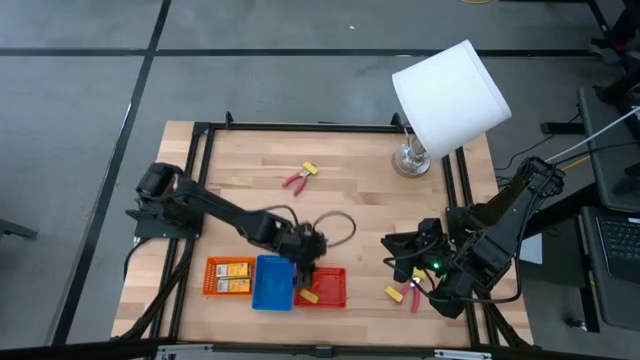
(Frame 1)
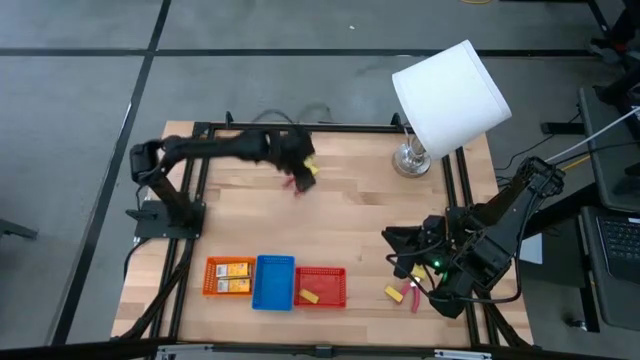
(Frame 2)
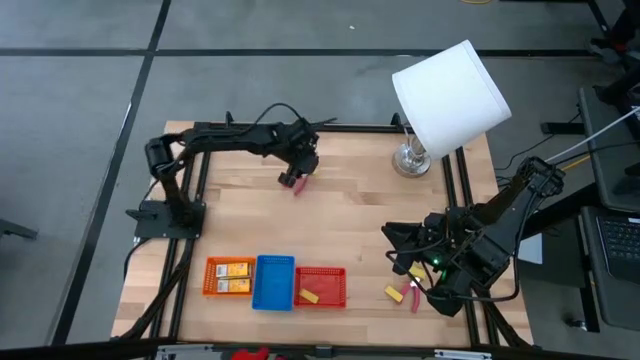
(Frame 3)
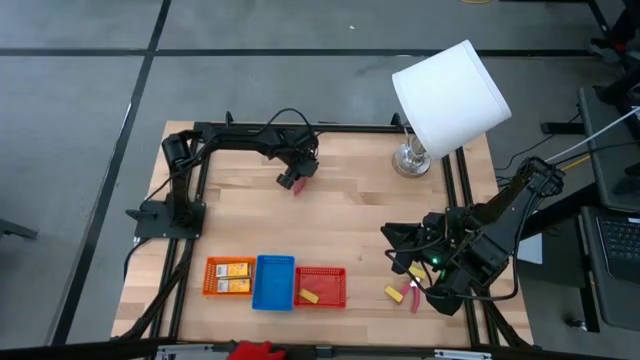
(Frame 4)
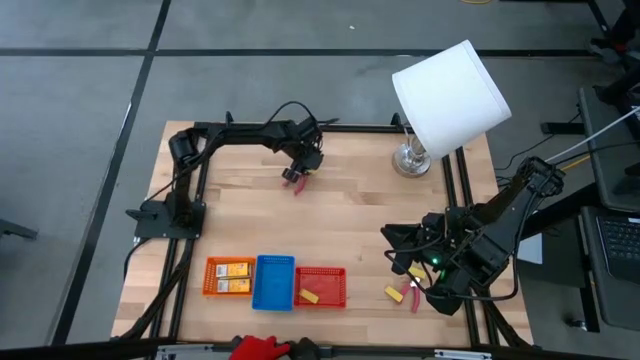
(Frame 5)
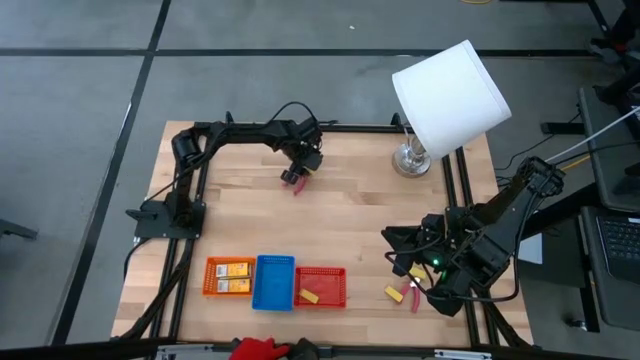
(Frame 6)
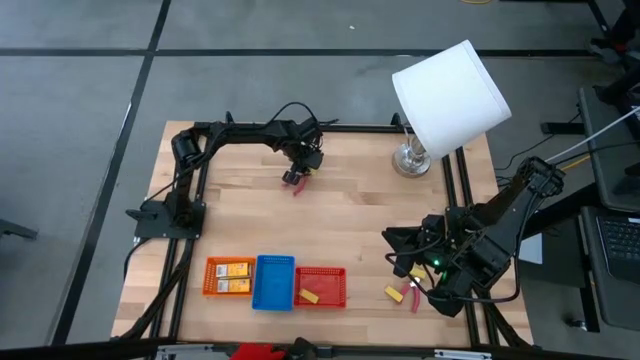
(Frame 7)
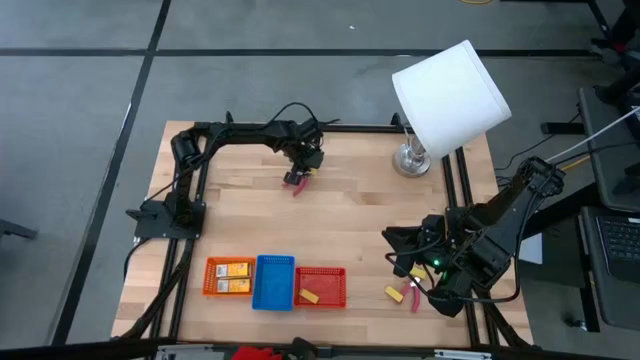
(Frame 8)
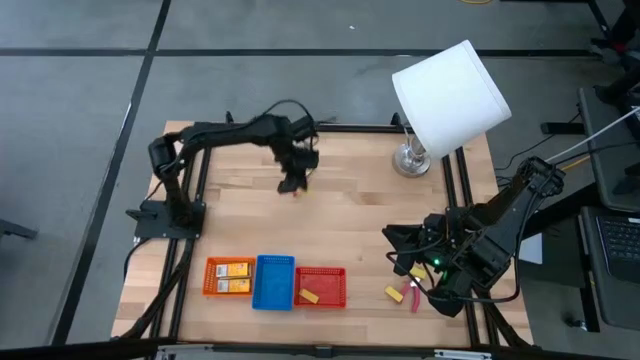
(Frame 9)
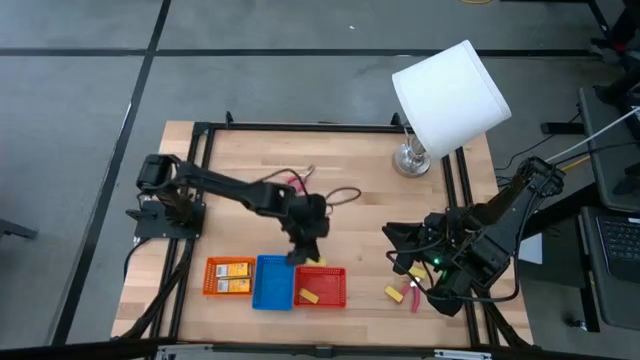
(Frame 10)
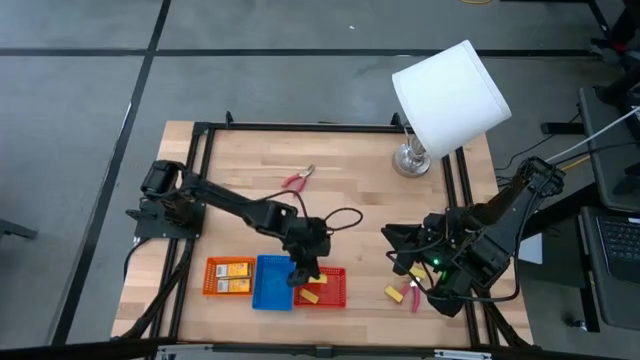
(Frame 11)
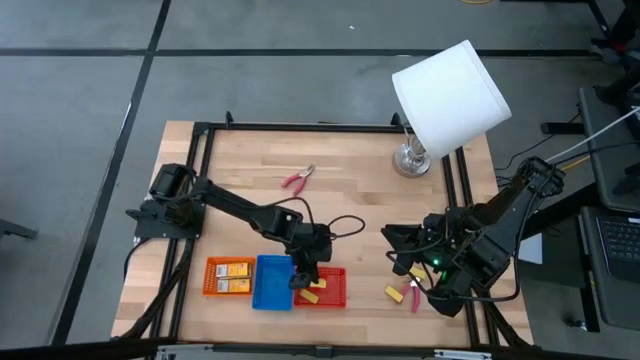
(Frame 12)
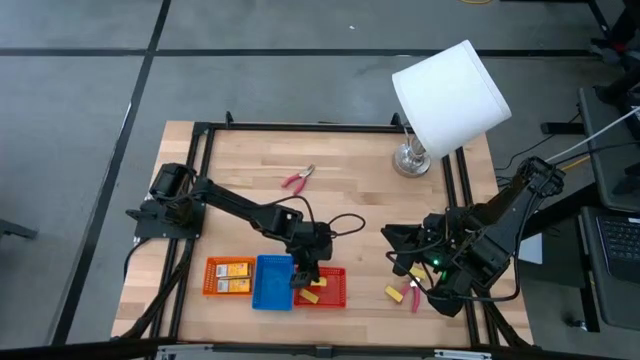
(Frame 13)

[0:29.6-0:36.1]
Task: Pick & Place School Supplies
Put the eraser into the red bin

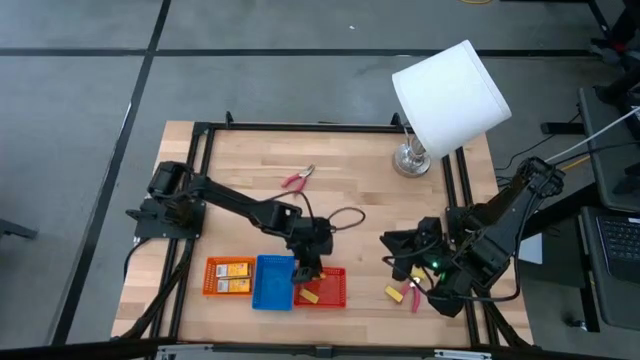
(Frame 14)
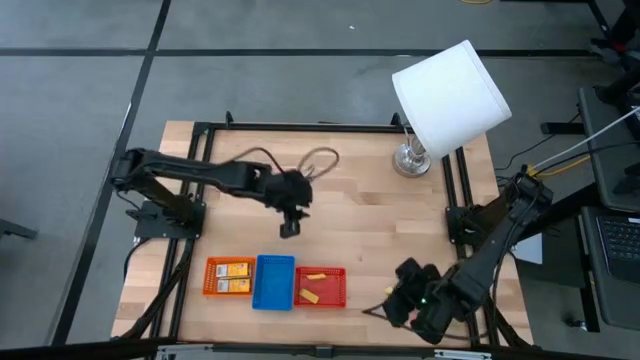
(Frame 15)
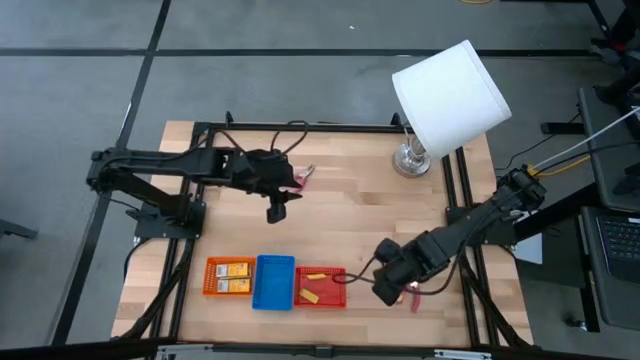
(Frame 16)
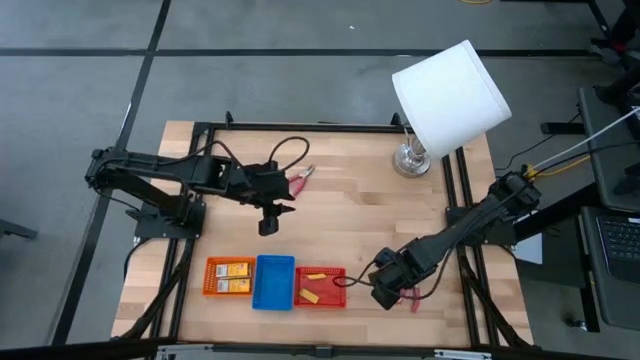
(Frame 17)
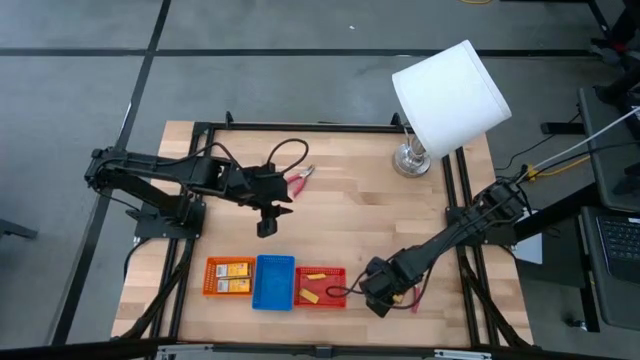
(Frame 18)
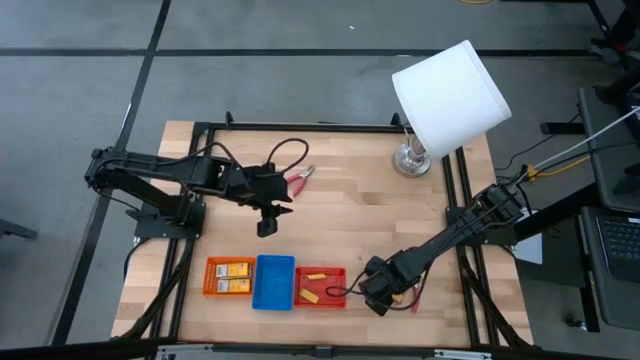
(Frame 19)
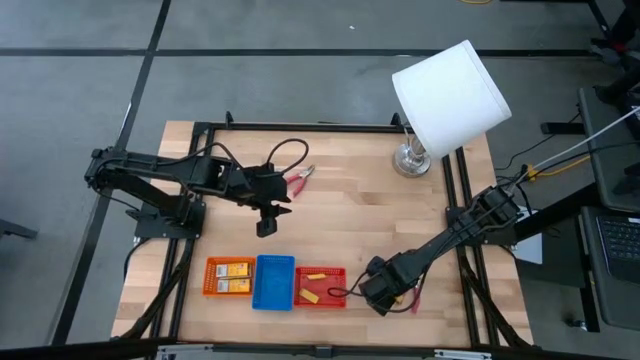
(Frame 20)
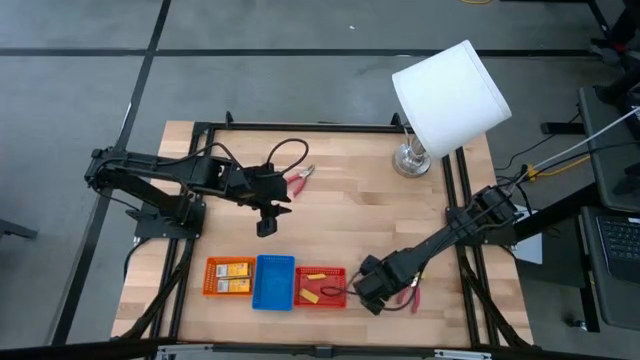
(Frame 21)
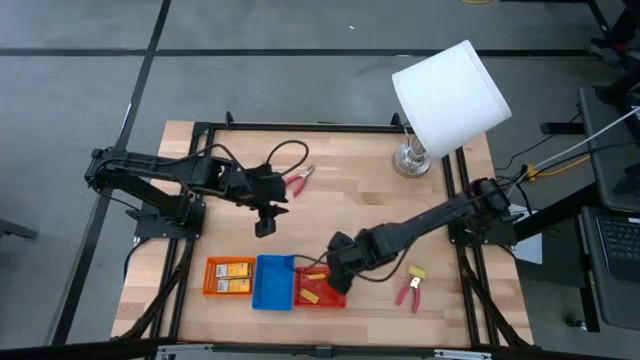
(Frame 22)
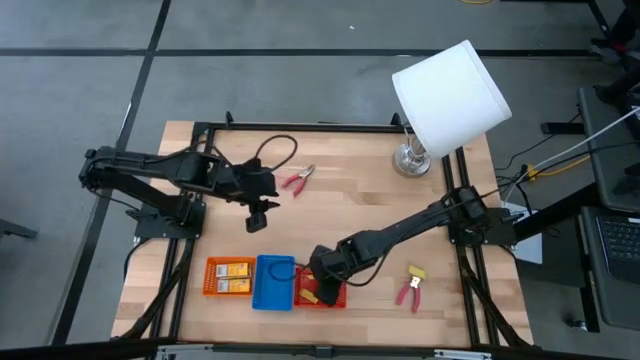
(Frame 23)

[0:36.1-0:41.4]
Put the eraser into the red bin

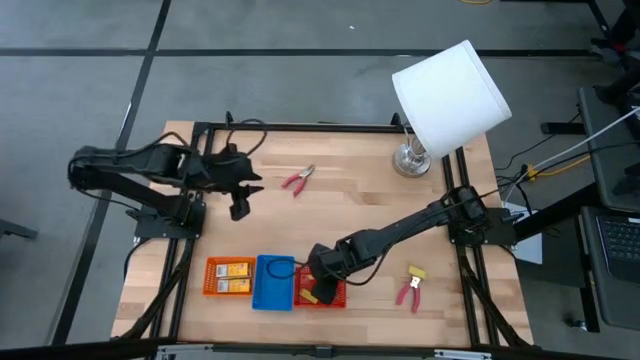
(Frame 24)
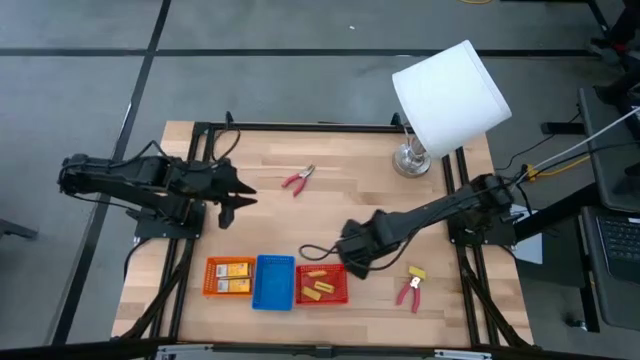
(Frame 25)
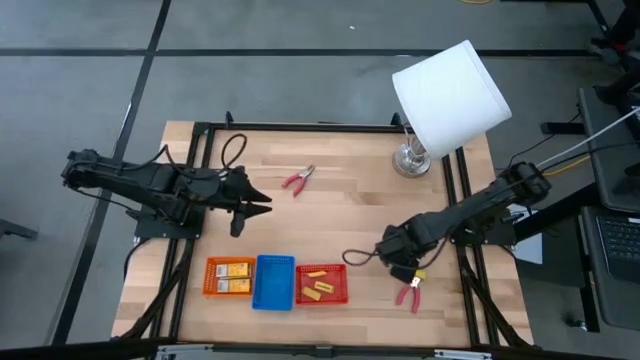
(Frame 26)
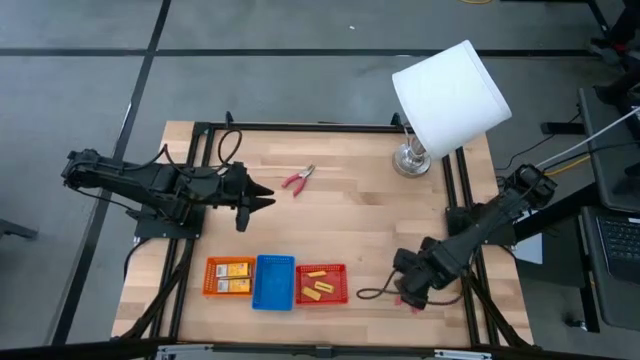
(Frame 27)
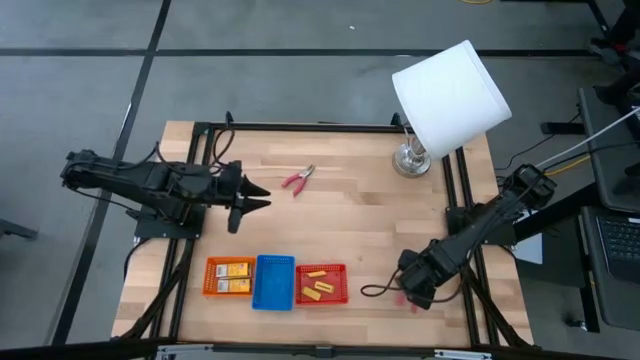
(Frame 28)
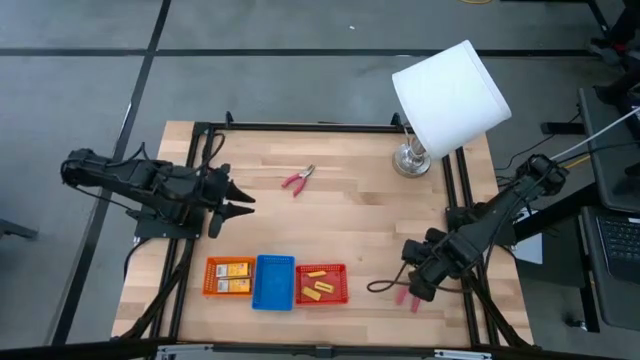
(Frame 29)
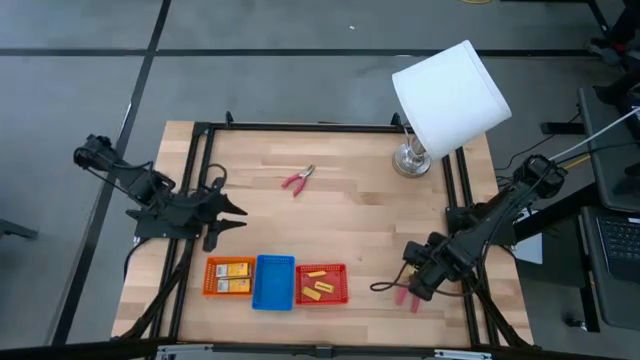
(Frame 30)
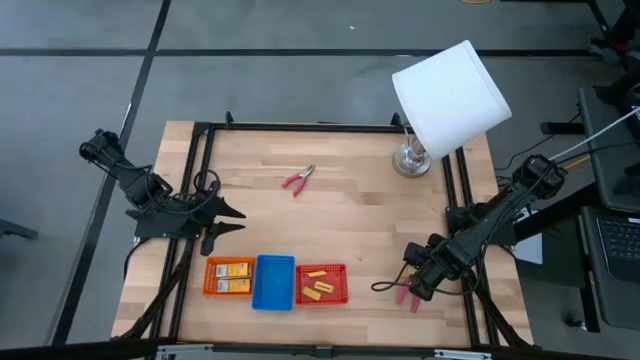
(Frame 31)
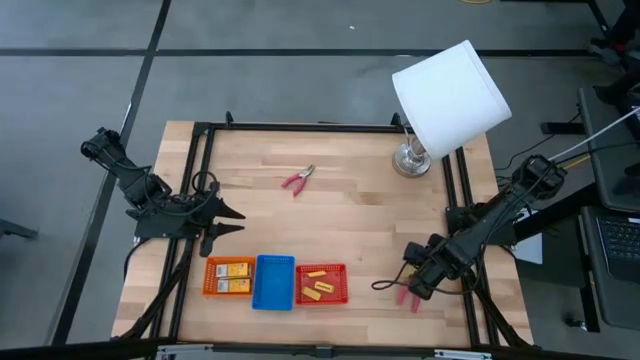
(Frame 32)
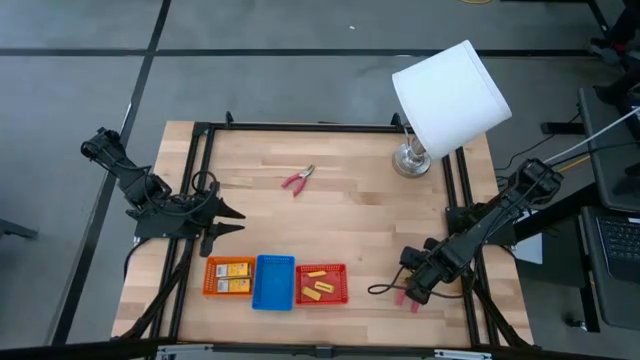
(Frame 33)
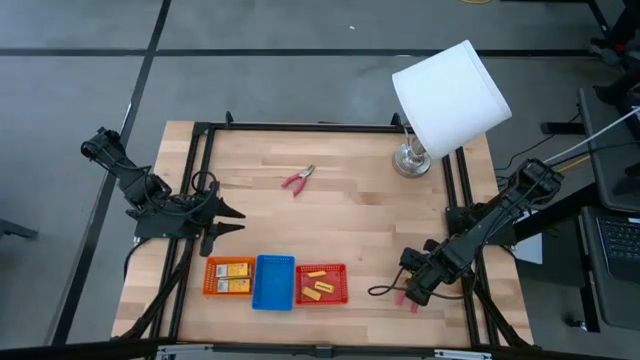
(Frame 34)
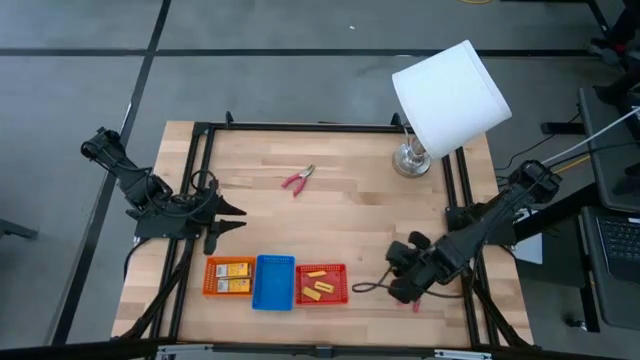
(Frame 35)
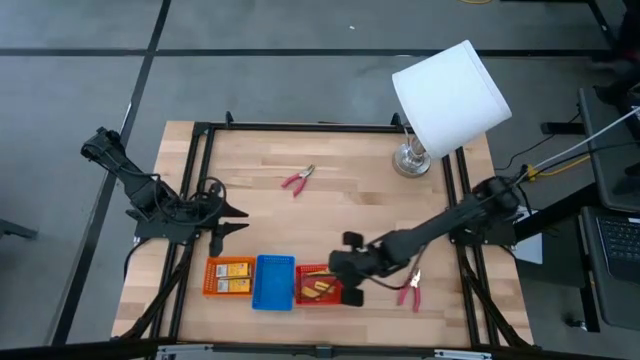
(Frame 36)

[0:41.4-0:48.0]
Put the eraser into the red bin

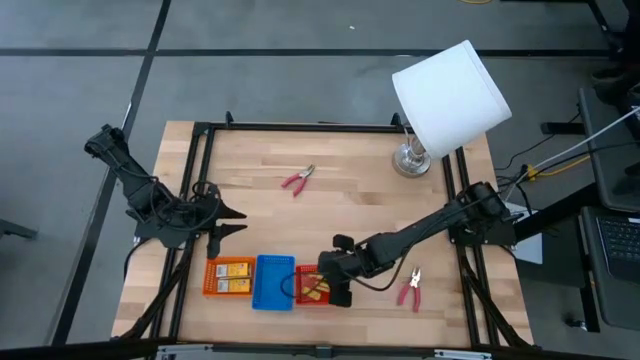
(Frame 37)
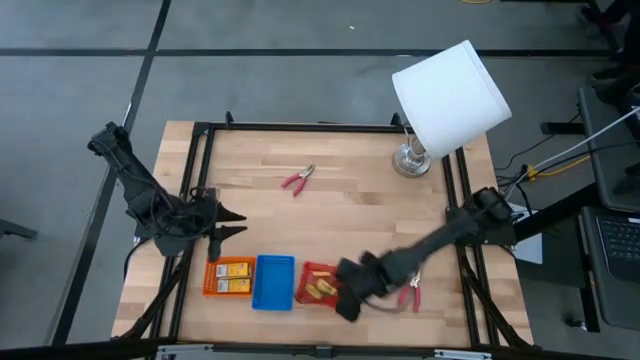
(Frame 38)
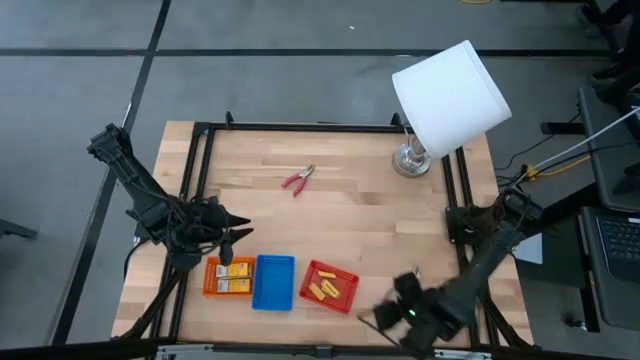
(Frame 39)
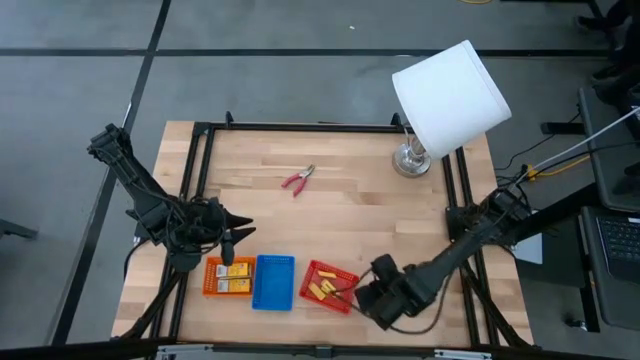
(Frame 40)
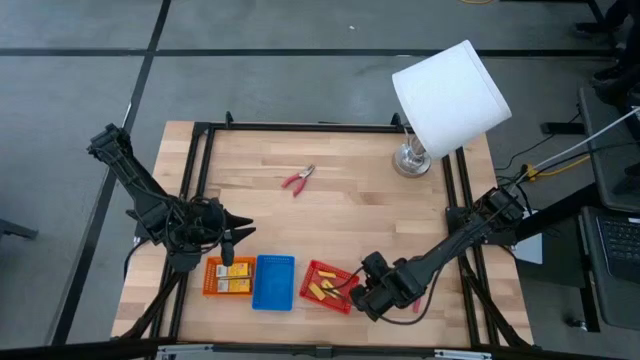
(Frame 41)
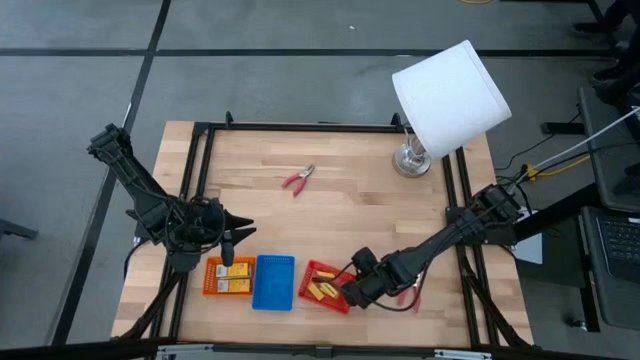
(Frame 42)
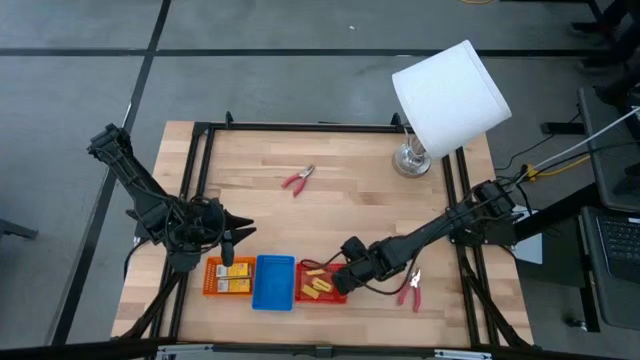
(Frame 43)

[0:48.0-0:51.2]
Adjust the red bin
